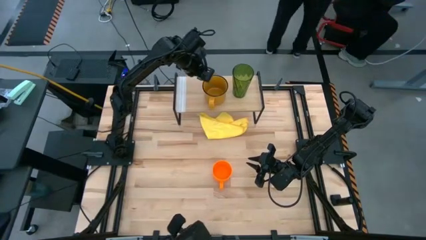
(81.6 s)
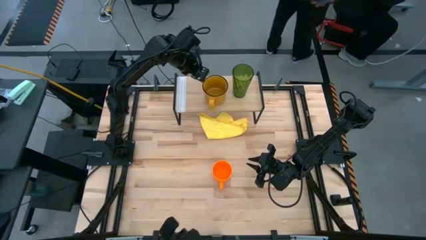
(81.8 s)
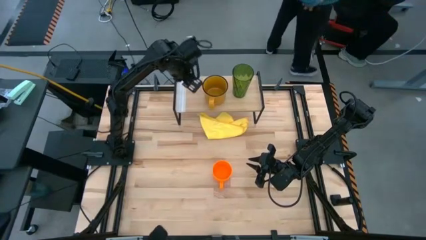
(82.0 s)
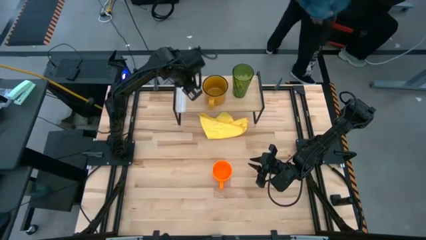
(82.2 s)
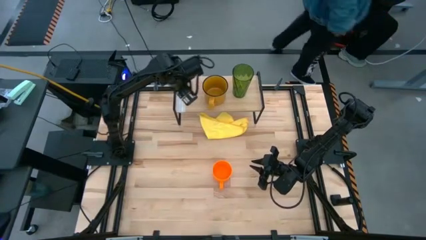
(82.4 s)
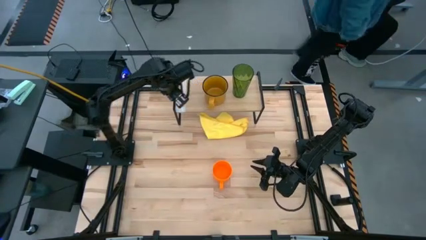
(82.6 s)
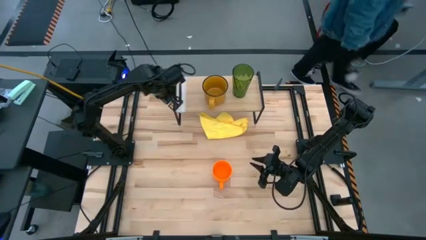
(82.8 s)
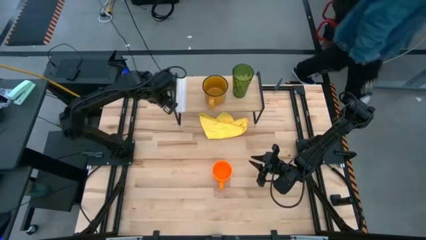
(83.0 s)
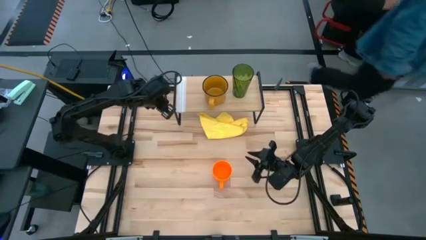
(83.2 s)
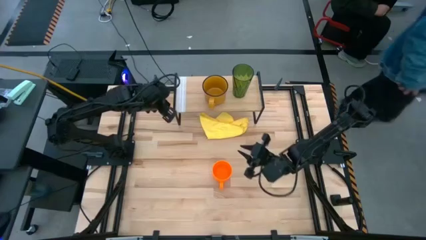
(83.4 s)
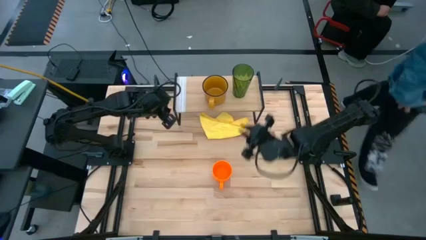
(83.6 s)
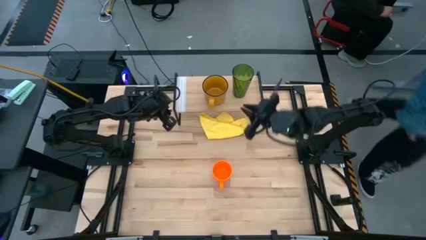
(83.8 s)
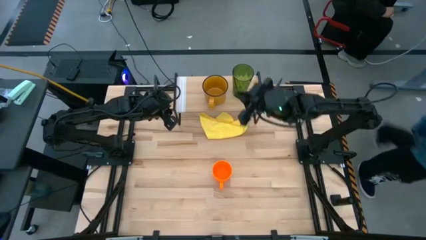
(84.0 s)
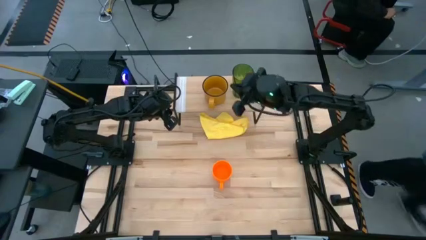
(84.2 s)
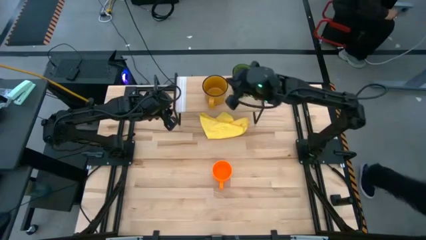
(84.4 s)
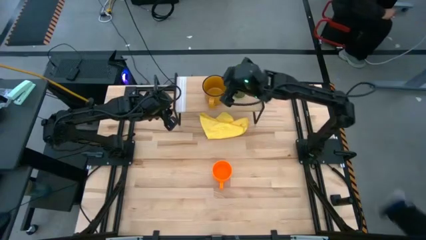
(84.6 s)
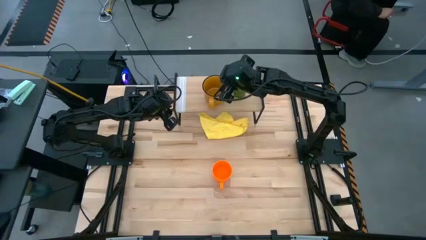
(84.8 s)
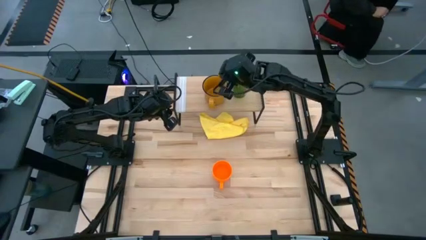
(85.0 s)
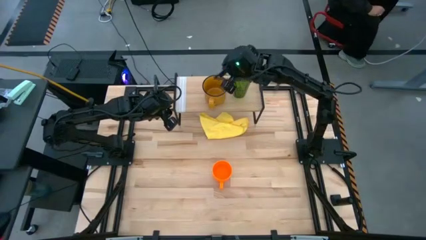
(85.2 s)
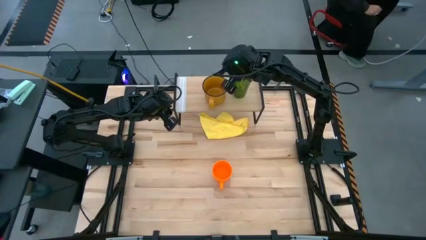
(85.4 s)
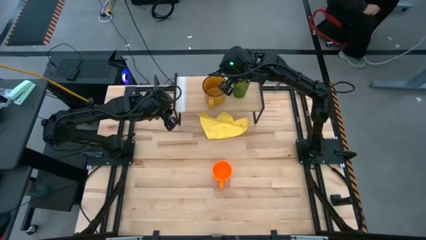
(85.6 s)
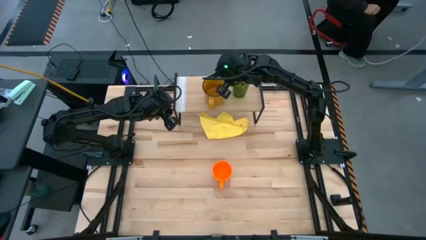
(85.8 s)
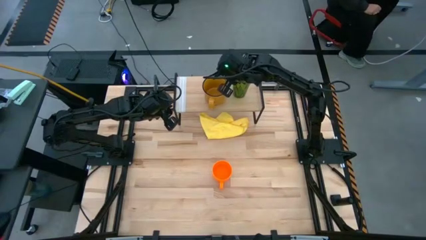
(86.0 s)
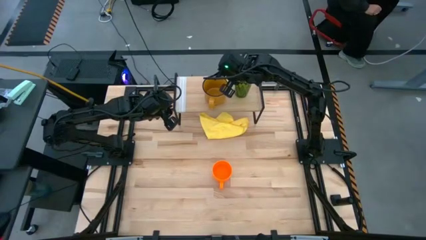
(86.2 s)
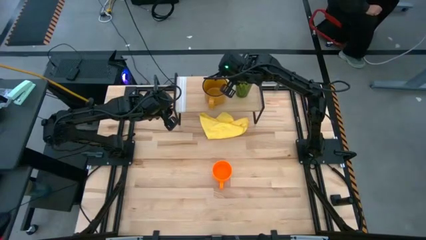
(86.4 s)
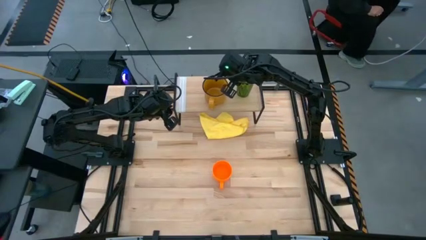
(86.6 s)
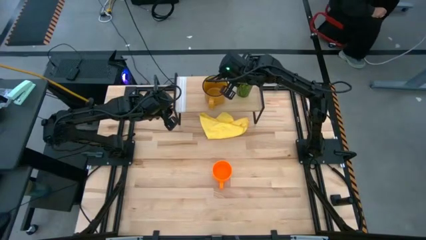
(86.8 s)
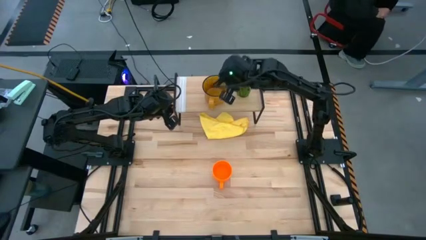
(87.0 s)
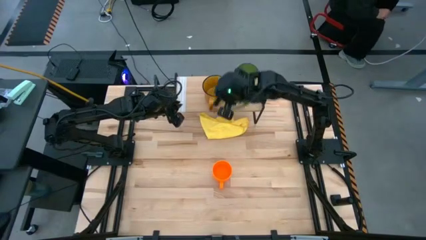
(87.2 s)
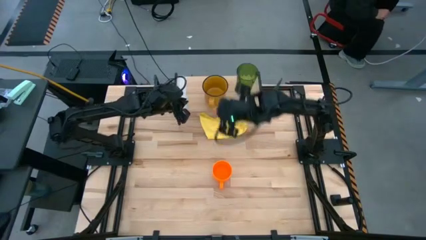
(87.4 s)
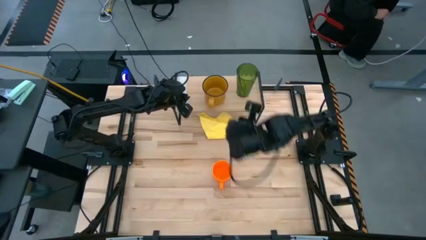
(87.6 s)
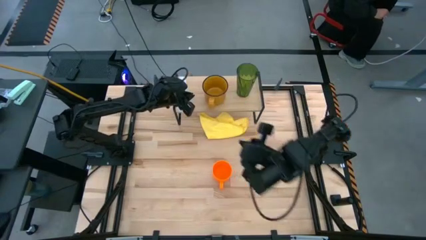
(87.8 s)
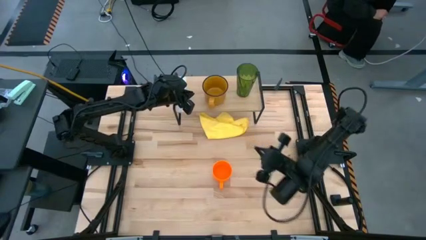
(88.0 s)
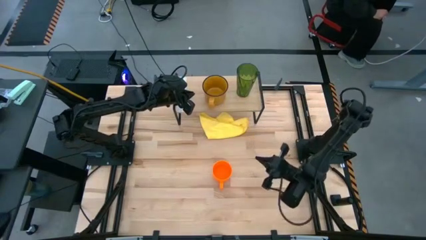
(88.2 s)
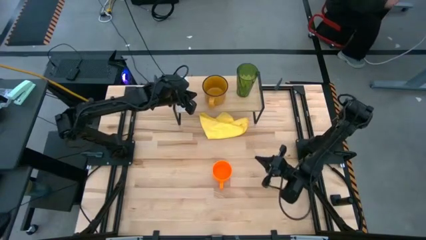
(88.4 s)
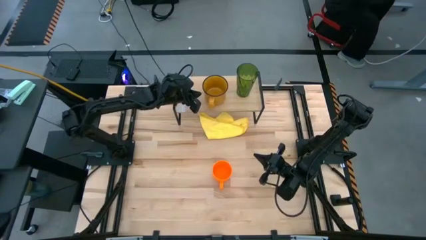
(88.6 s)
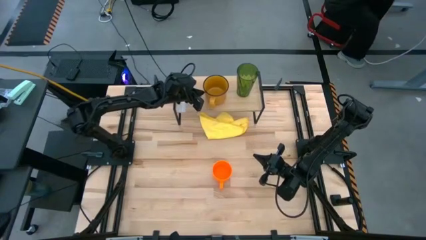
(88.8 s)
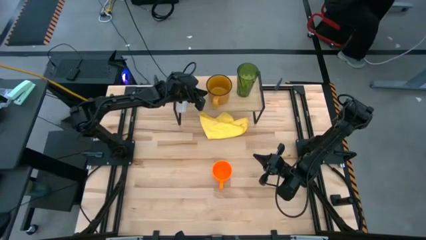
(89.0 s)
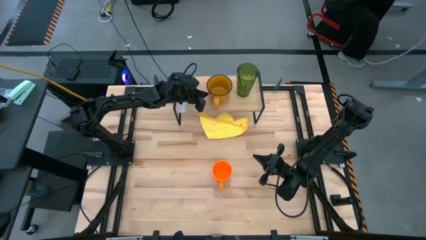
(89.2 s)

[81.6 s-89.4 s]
Task: Stack small to large cups/mugs on shelf
Adjust the green cup and yellow mug
